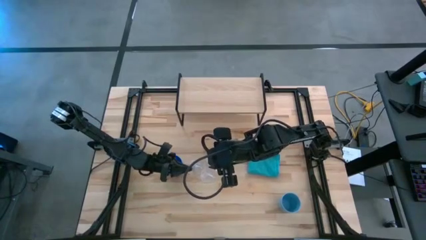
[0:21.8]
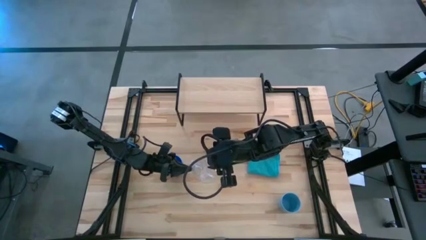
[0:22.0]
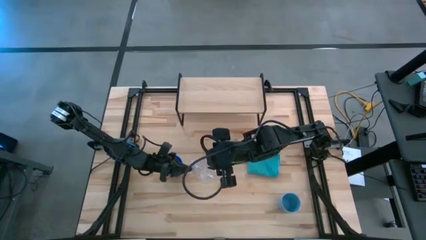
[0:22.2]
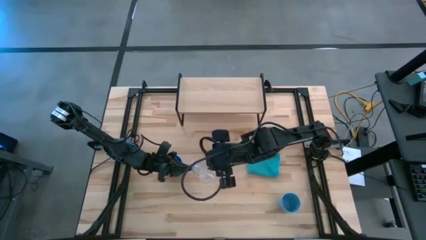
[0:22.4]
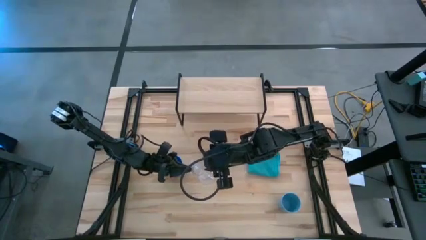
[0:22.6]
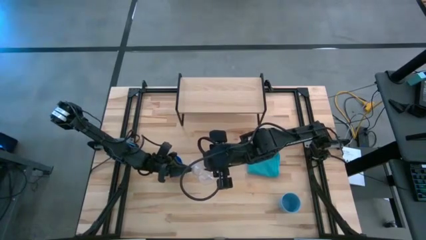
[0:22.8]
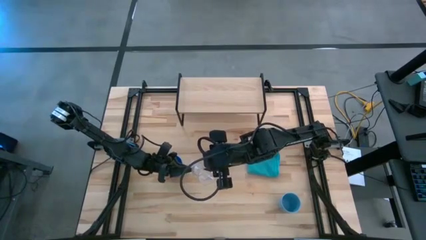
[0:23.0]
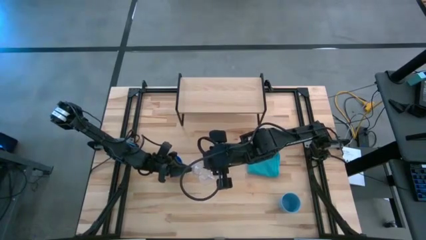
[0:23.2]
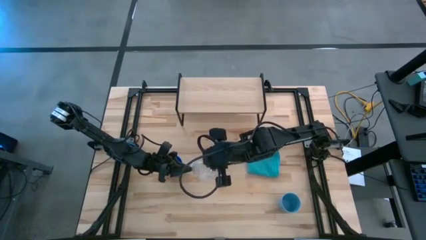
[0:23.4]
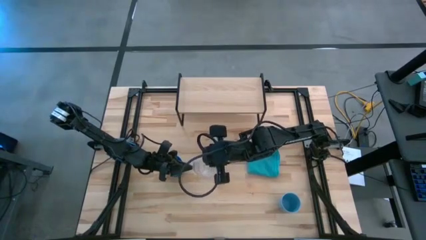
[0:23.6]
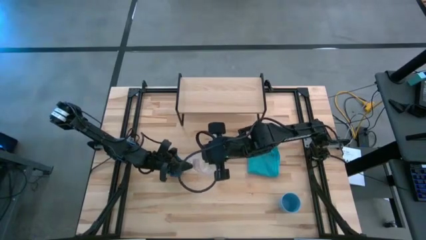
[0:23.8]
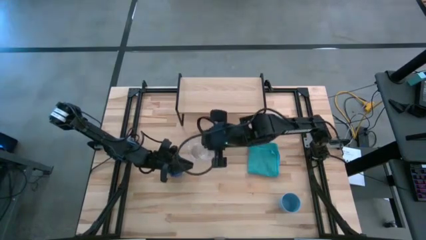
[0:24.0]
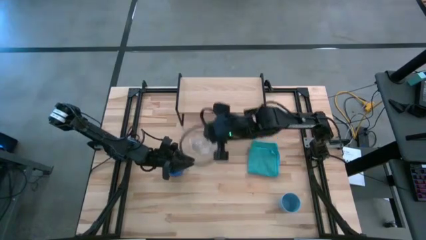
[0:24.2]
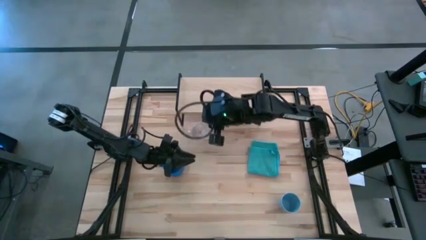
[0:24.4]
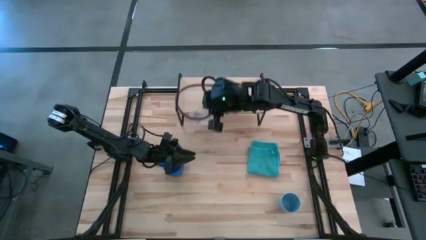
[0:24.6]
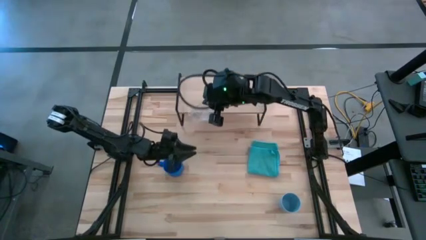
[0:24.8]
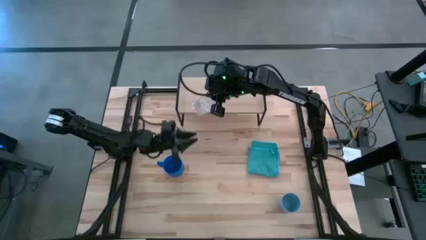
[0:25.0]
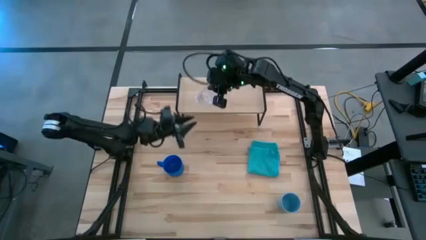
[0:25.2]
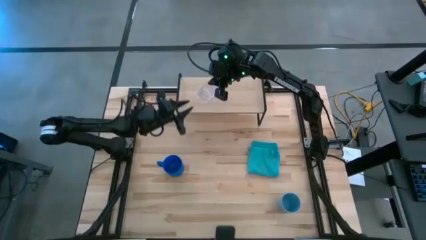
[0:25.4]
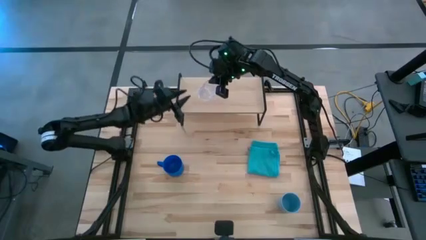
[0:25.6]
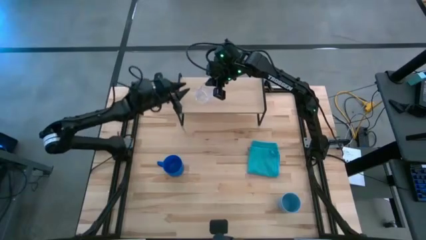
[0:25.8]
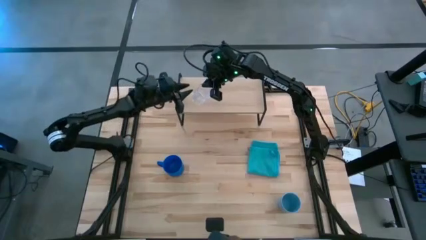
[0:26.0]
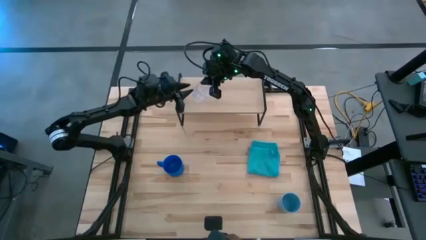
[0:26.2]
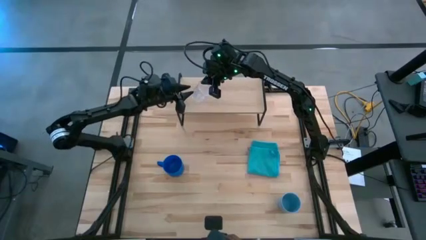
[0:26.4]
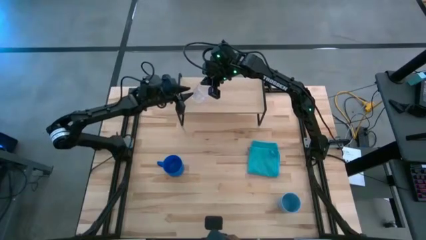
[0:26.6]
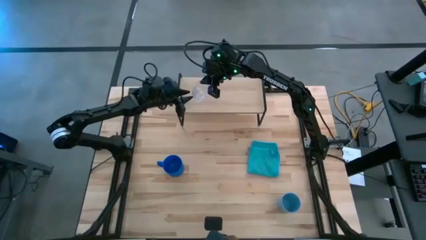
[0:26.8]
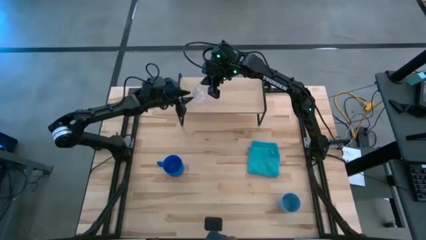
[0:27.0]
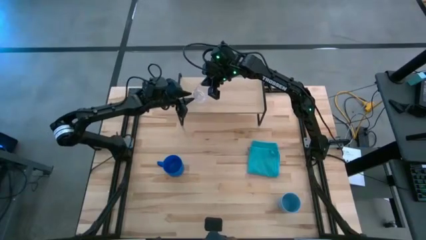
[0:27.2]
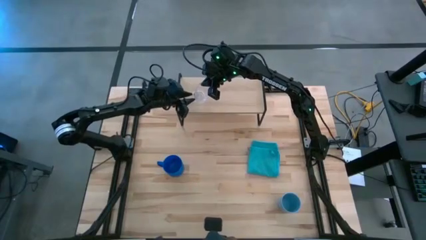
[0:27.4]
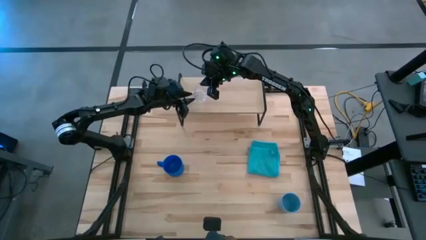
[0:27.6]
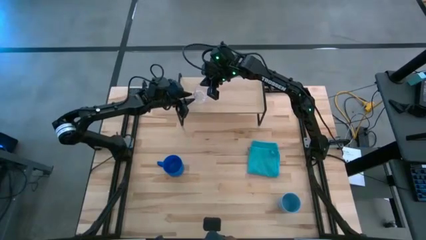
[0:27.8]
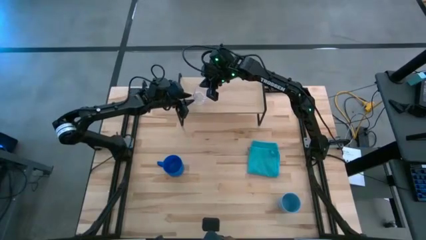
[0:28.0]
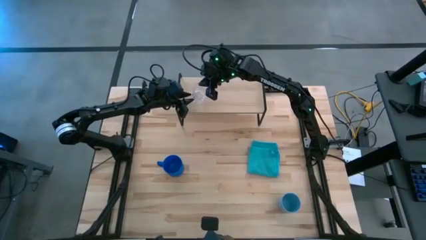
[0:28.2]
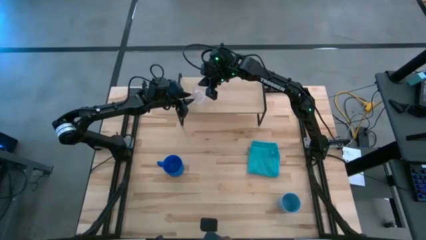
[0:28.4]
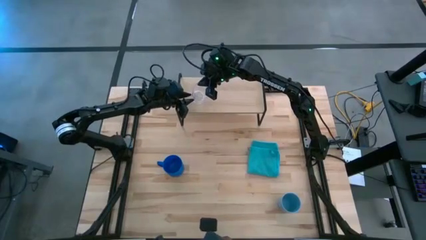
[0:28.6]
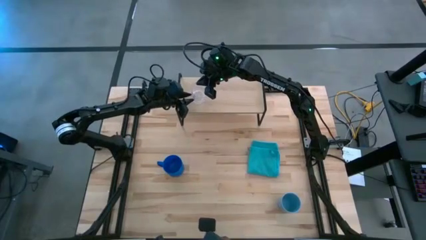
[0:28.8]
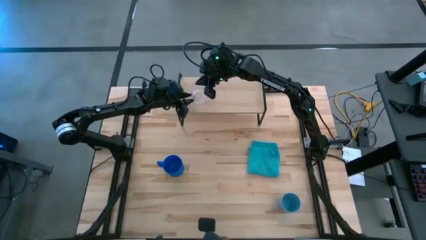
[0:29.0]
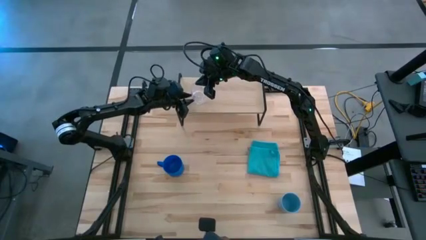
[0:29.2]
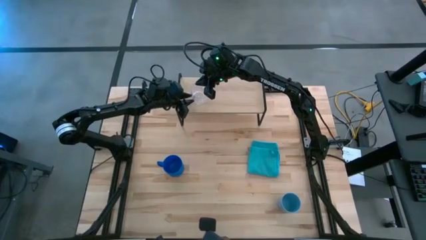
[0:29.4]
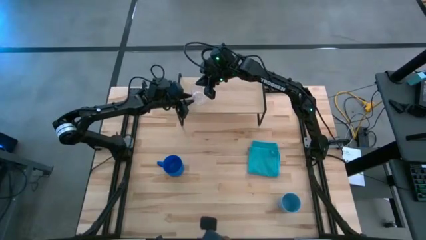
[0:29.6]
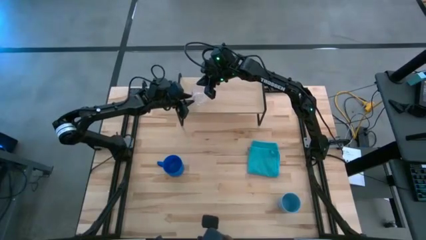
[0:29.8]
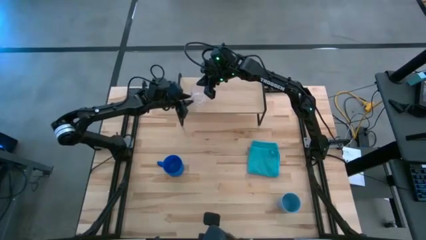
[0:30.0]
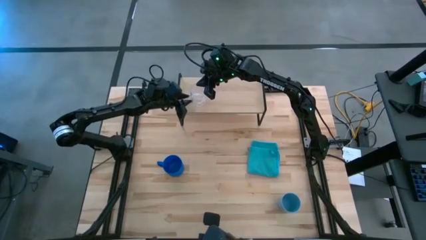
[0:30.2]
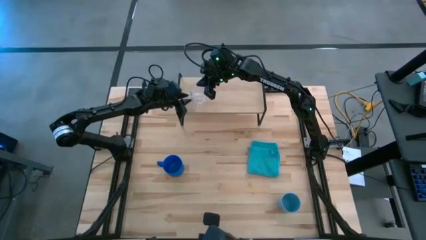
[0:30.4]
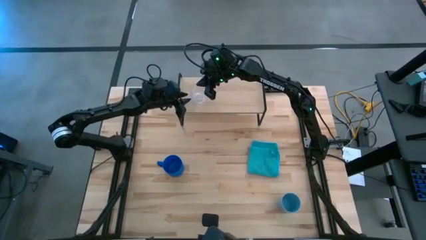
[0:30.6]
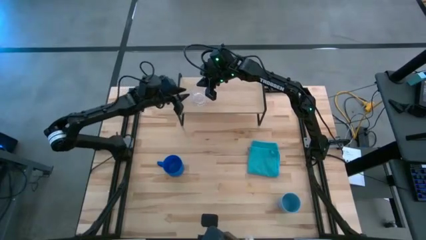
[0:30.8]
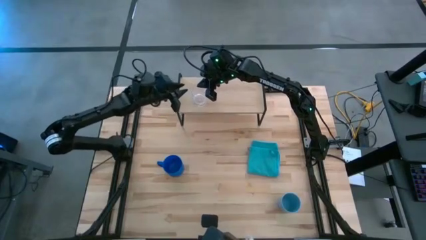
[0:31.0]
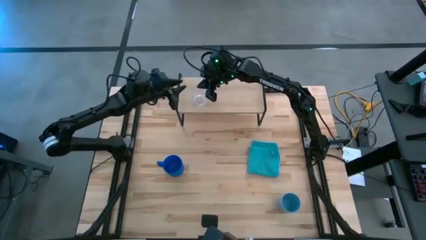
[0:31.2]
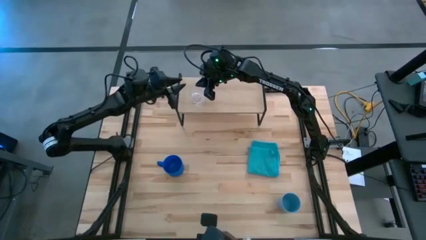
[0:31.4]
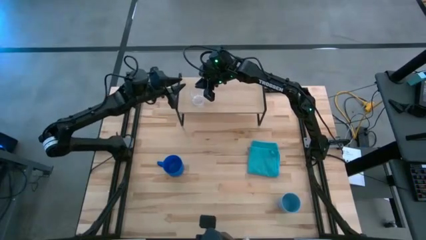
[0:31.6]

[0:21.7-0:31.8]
Task: Stack small to large cups/mugs on shelf
Put the transparent mug on the shelf
